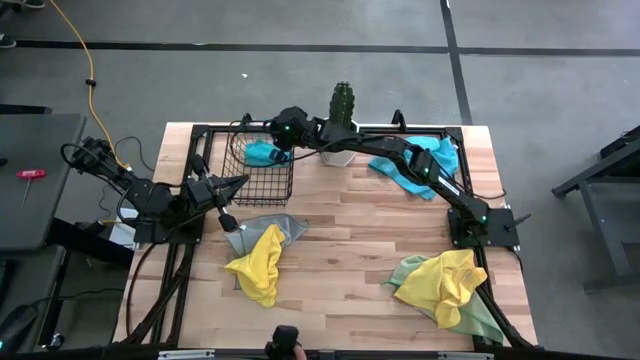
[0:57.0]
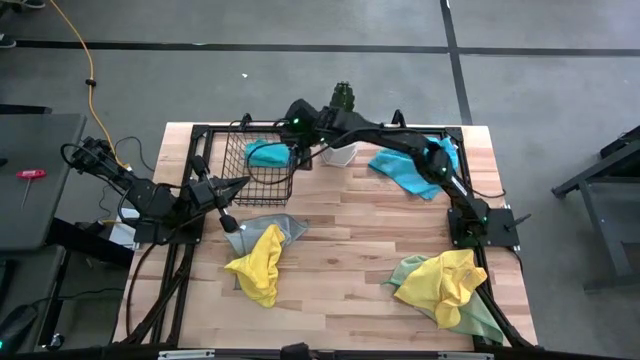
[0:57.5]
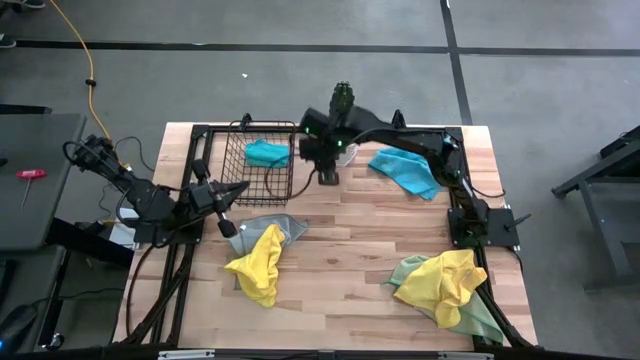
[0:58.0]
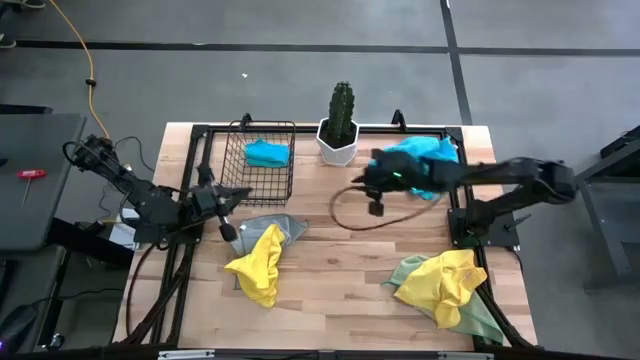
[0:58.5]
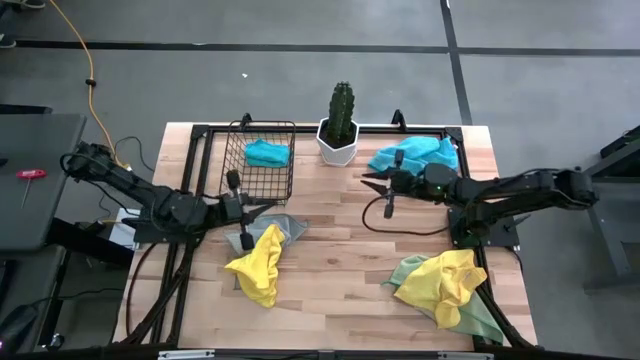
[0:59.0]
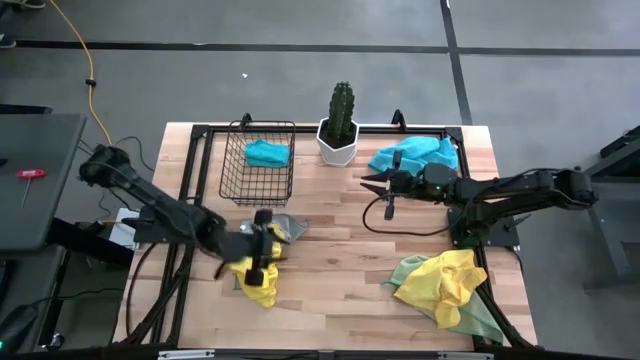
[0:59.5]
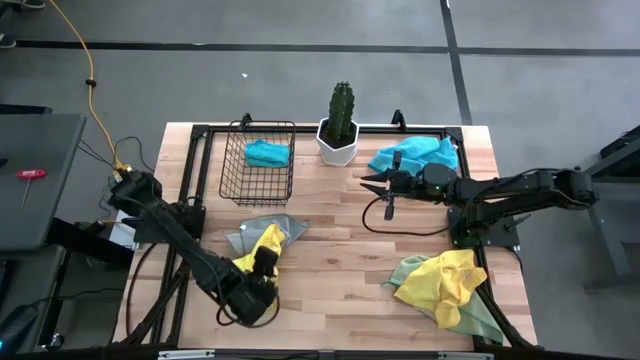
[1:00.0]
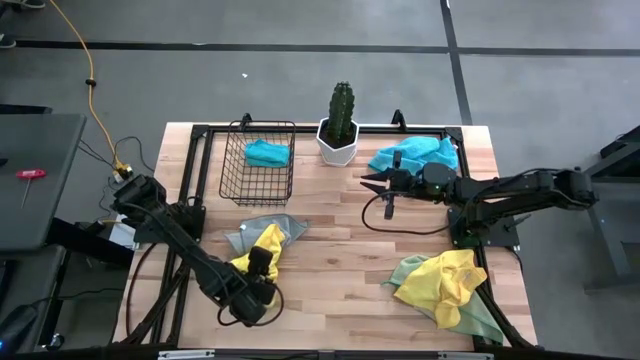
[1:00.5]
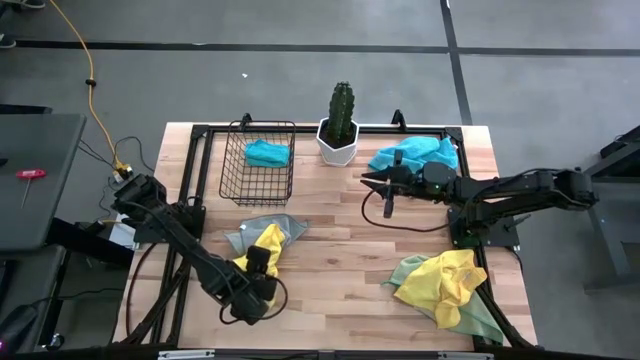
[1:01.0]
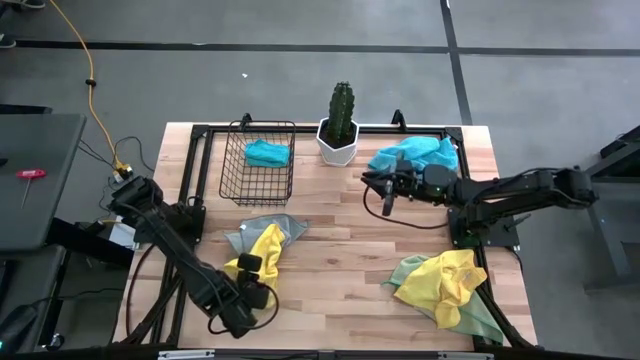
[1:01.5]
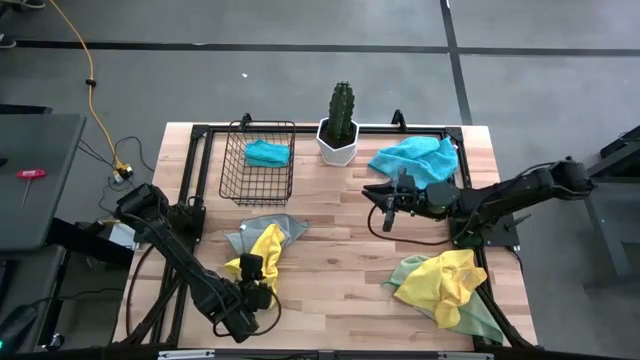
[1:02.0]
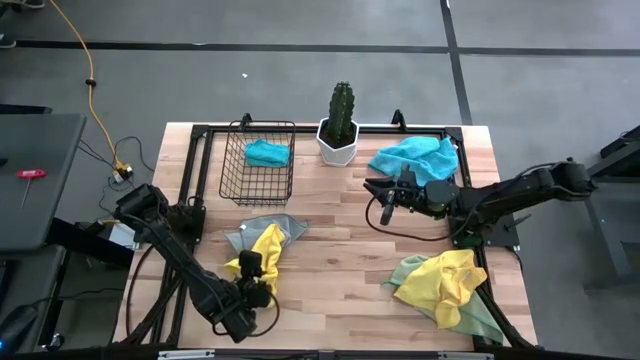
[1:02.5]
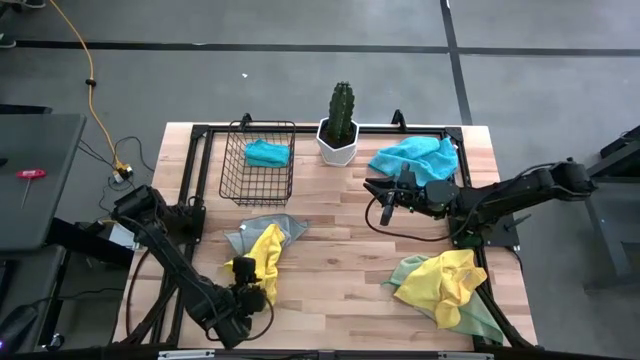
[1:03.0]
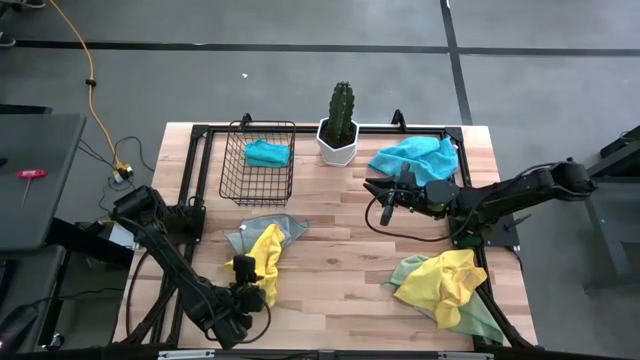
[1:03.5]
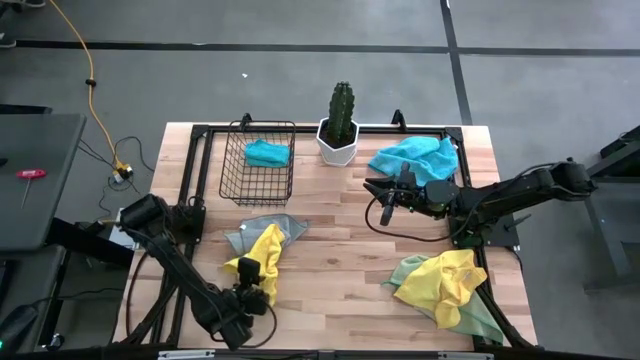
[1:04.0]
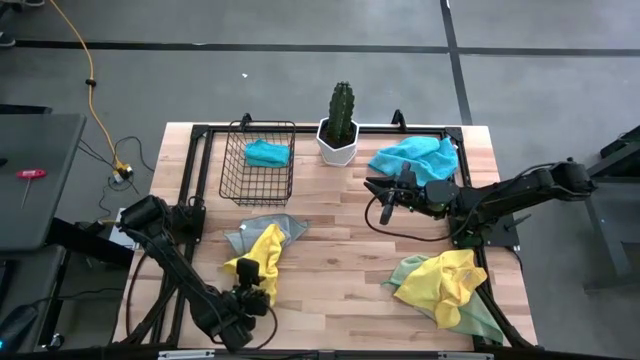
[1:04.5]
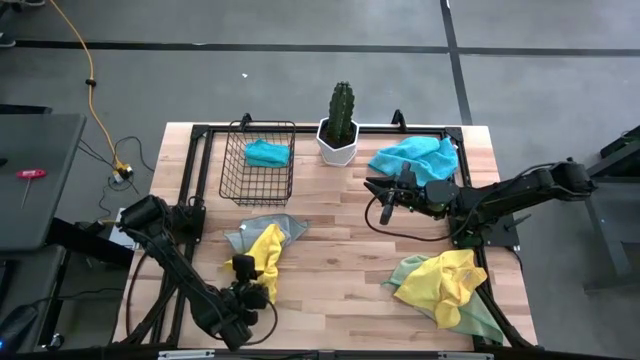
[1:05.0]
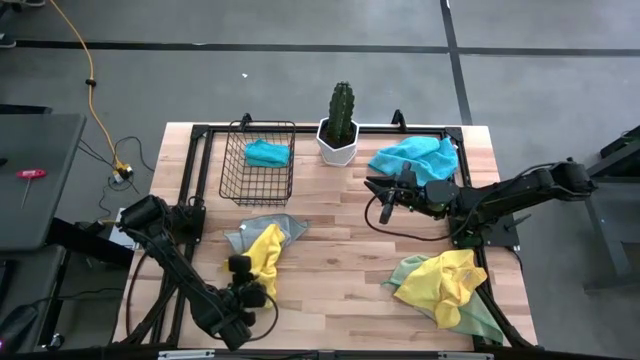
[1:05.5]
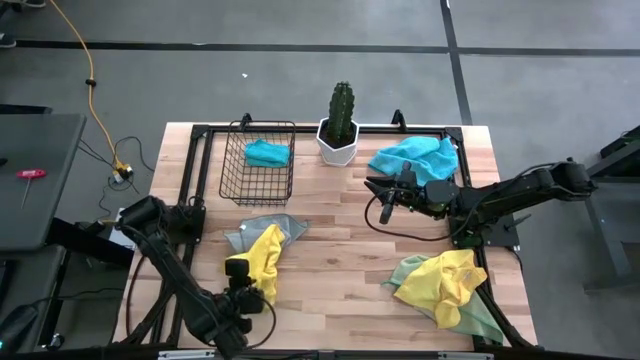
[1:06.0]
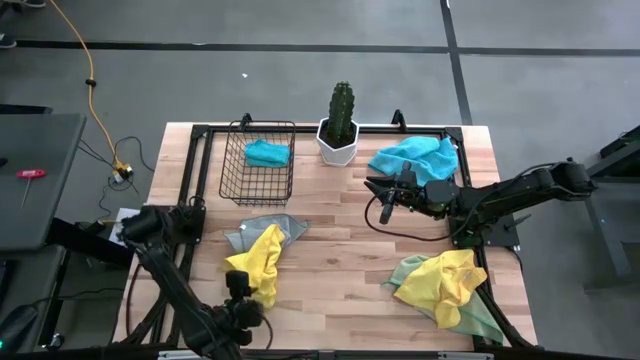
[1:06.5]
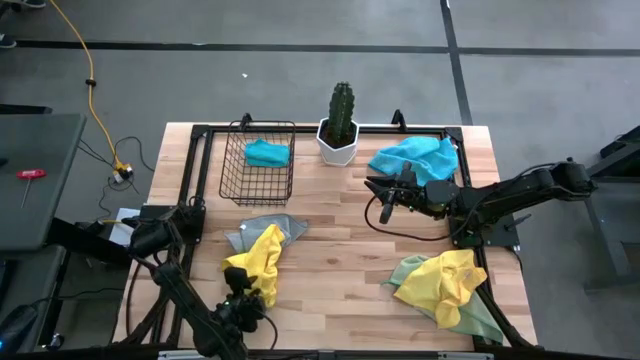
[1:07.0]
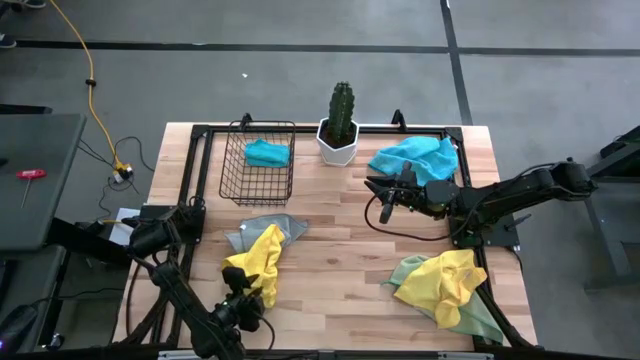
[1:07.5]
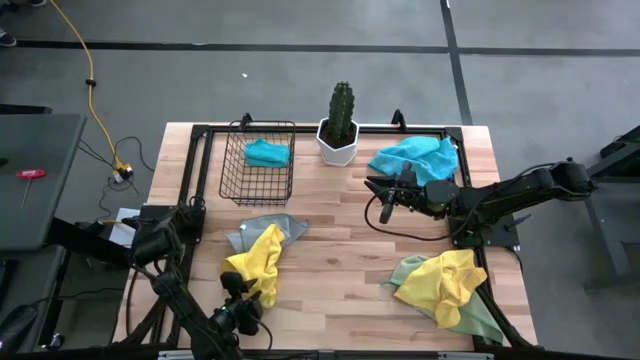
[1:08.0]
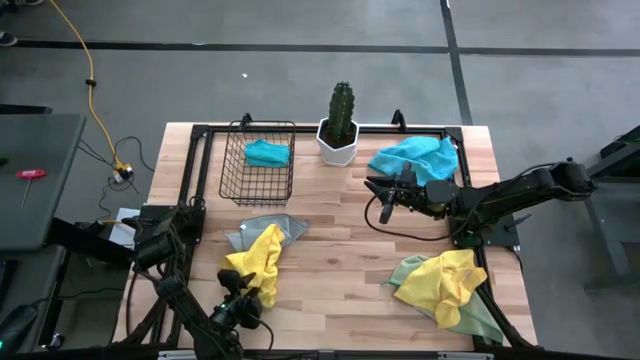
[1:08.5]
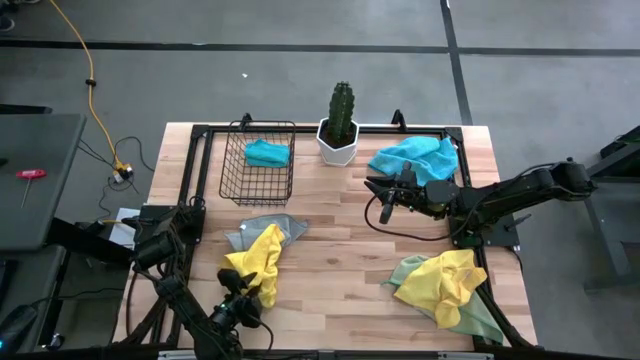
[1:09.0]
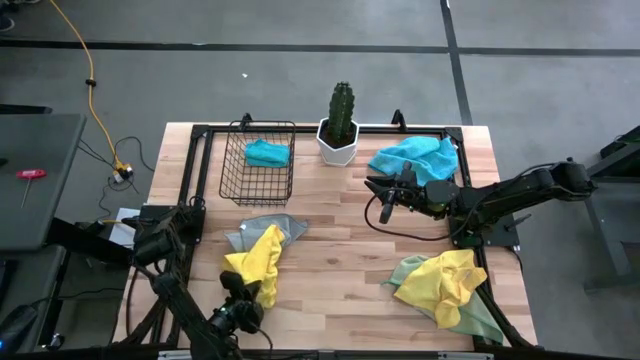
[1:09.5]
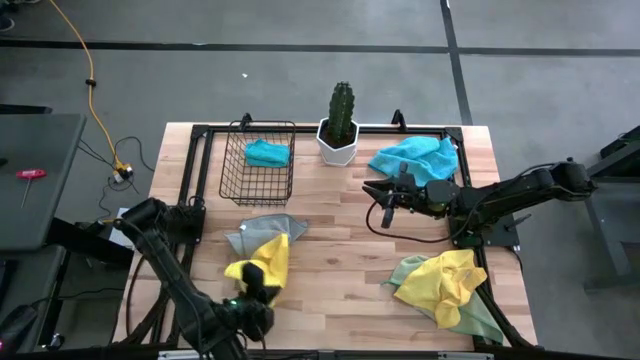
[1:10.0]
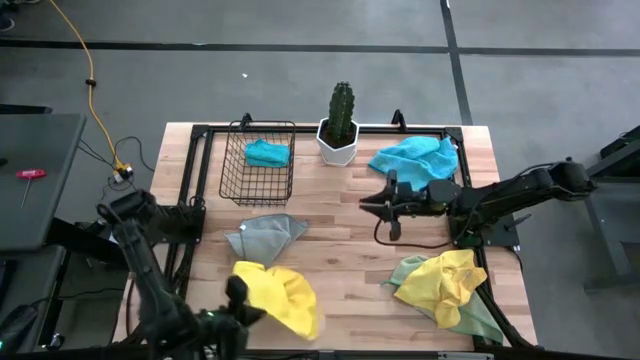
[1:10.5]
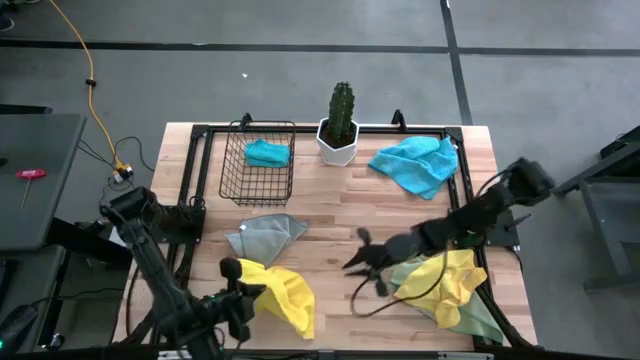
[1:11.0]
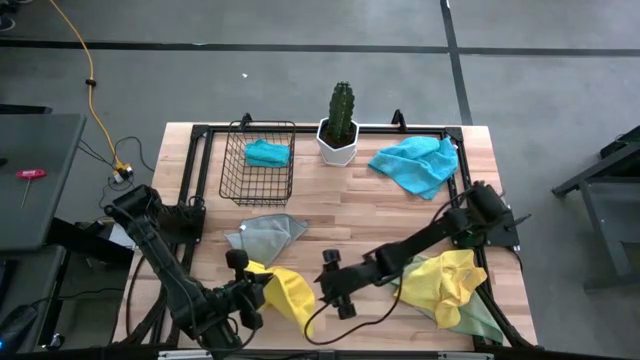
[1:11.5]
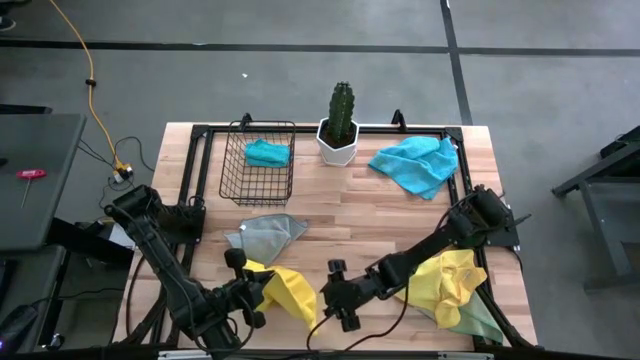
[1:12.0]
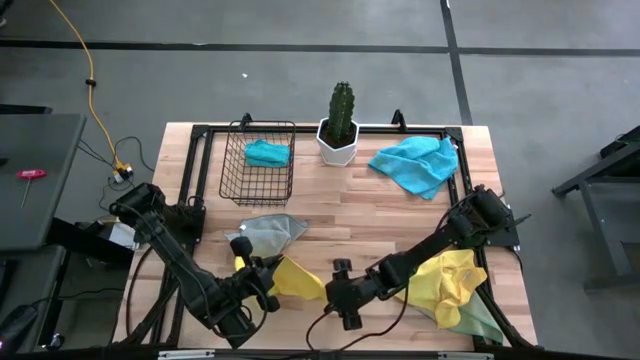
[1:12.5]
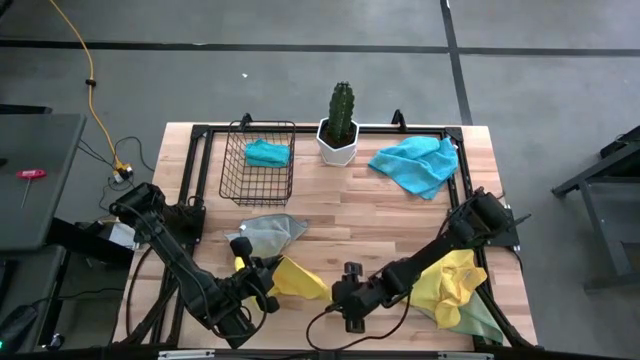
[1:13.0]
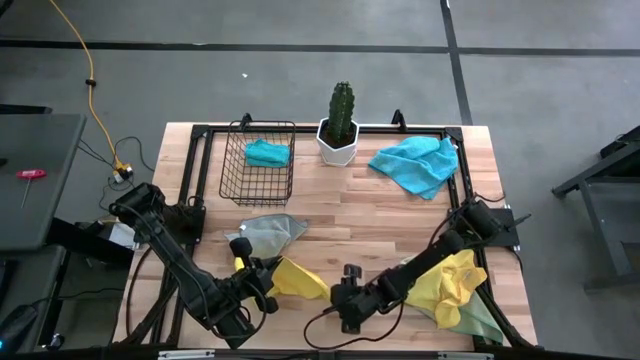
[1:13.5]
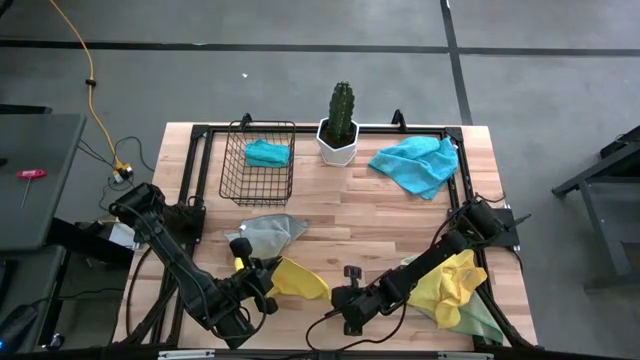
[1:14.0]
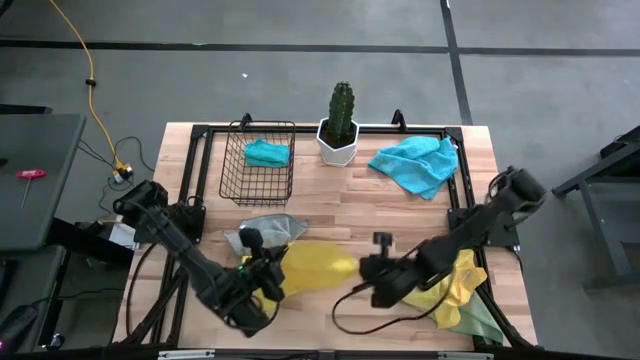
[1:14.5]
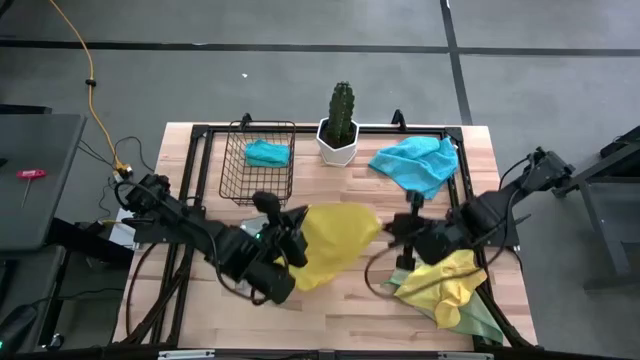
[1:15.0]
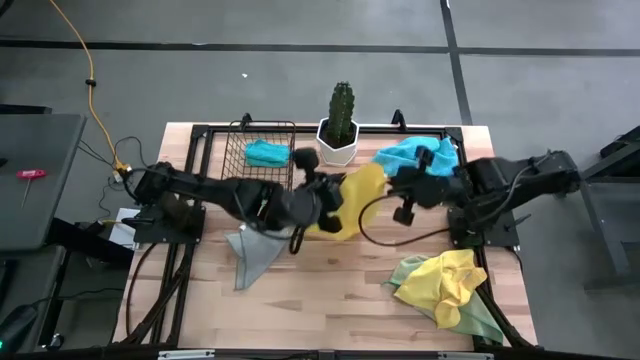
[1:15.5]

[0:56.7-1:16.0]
Task: Fold microfiber towels
Fold the left yellow microfiber towel on the table

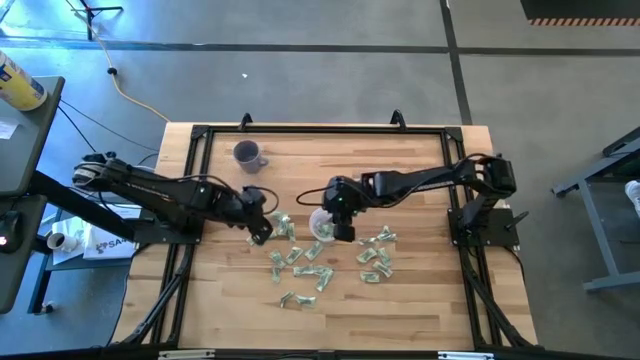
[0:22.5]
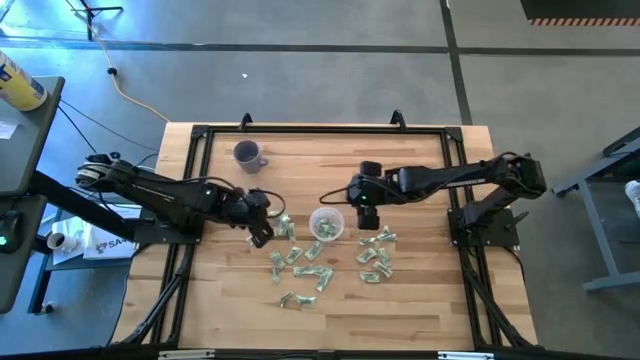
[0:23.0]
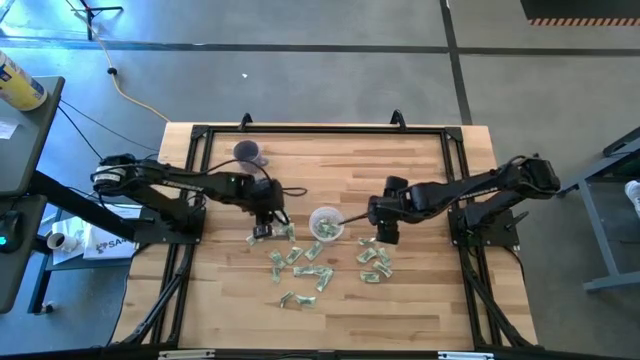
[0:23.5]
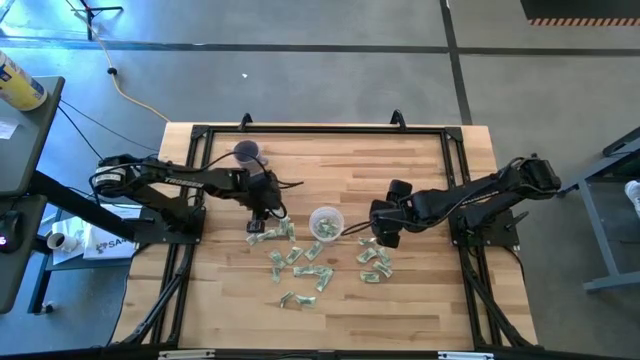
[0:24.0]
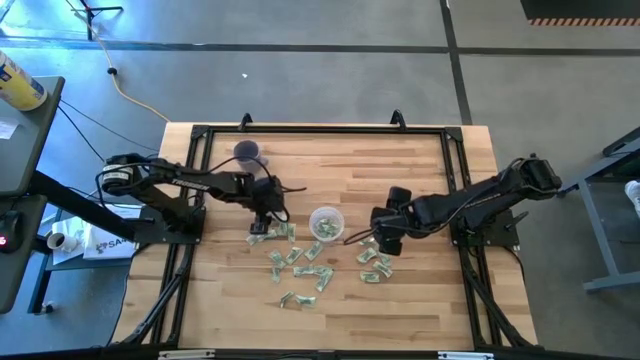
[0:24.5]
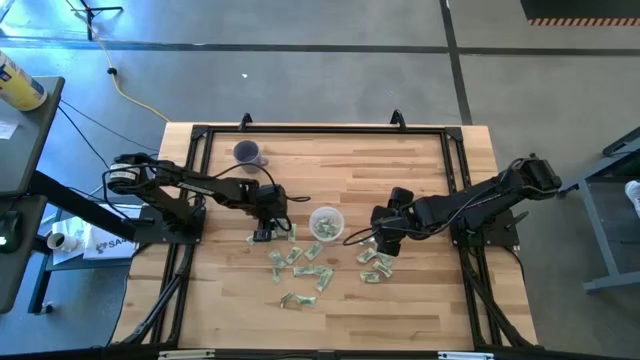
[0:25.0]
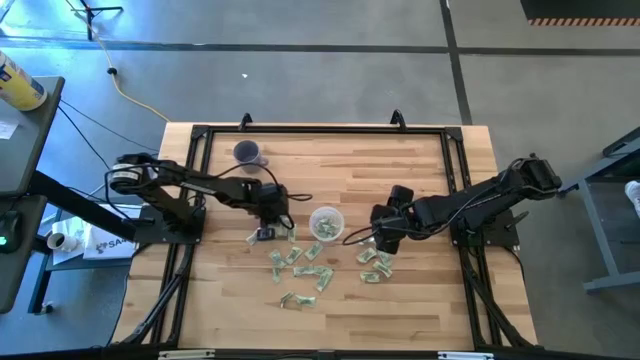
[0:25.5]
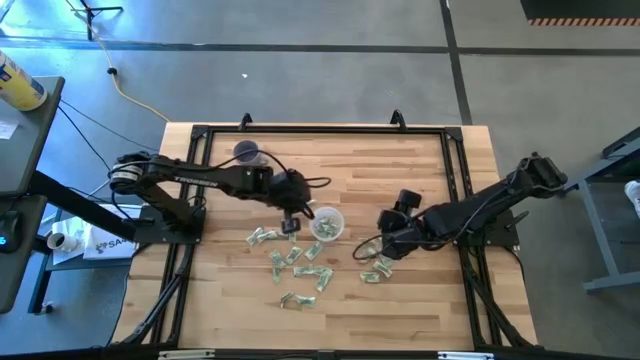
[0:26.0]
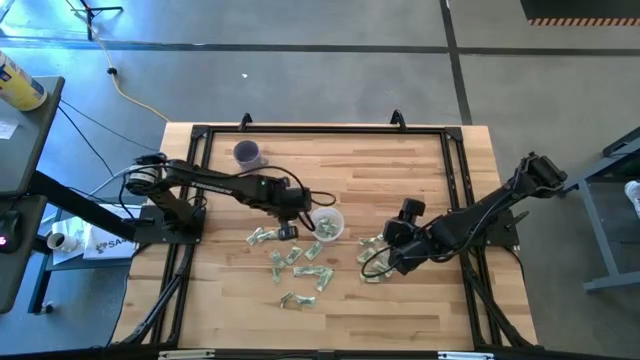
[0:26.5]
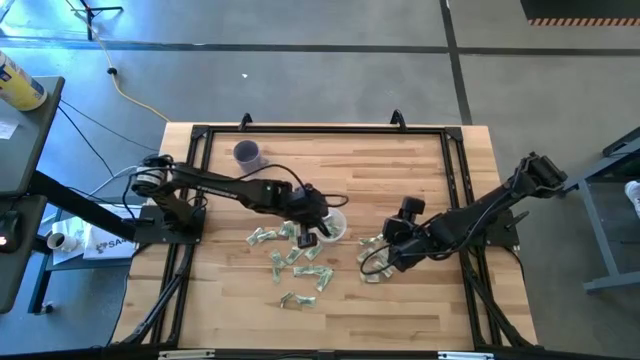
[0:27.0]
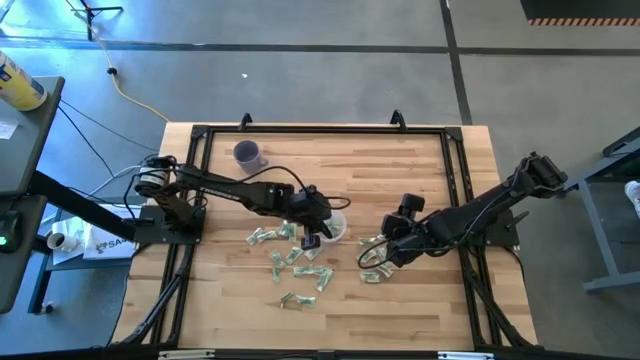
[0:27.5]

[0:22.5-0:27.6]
Task: Pick and place Stevia / Truvia into bins
Put the stevia packet into the transparent container
